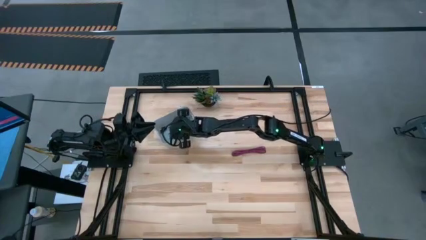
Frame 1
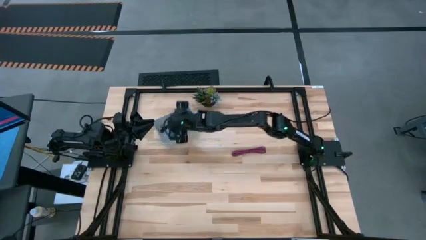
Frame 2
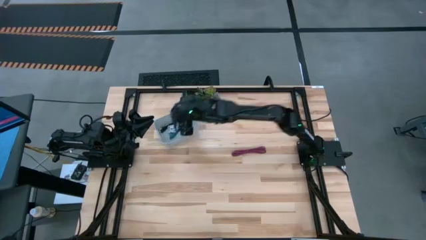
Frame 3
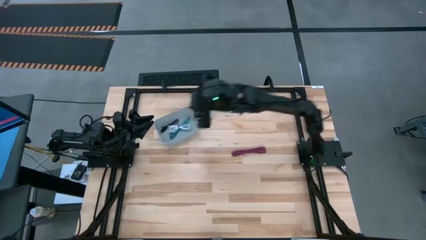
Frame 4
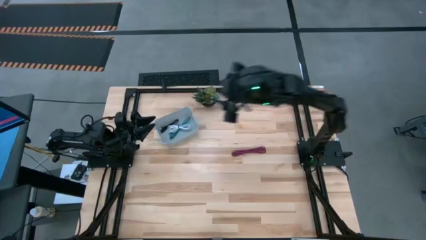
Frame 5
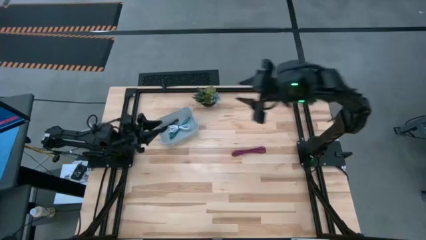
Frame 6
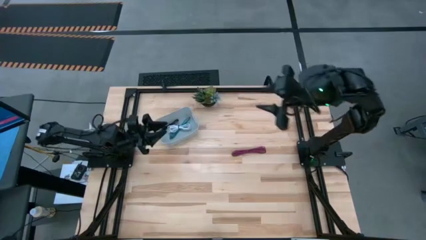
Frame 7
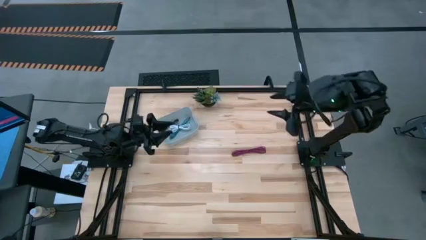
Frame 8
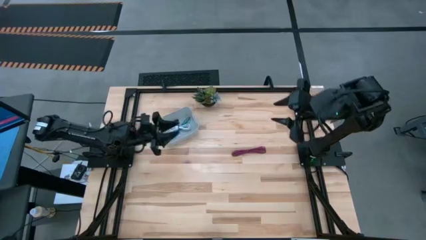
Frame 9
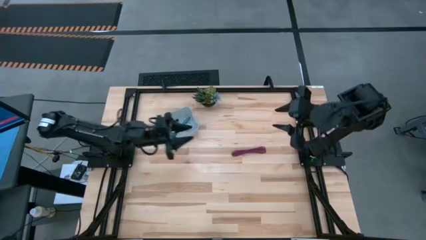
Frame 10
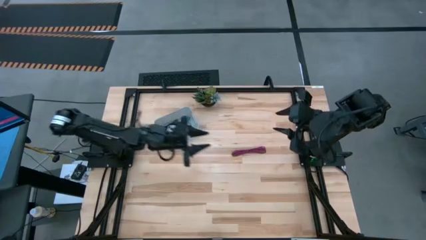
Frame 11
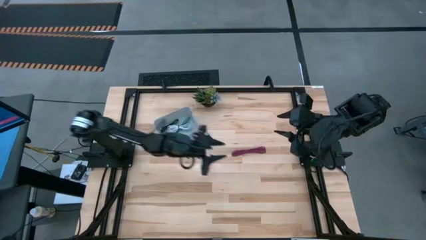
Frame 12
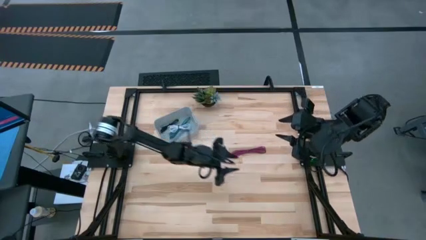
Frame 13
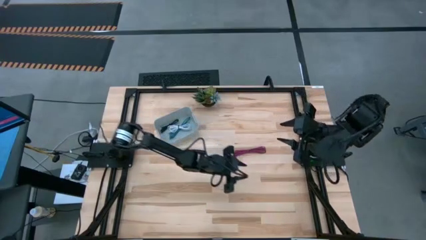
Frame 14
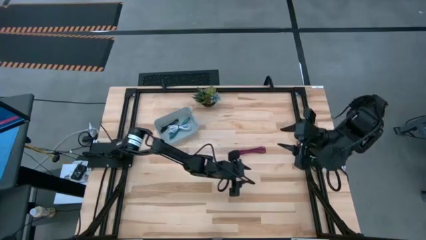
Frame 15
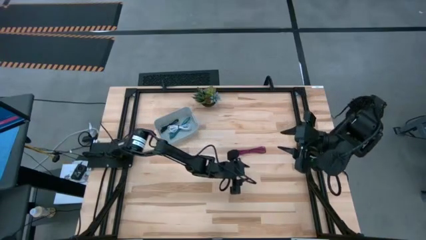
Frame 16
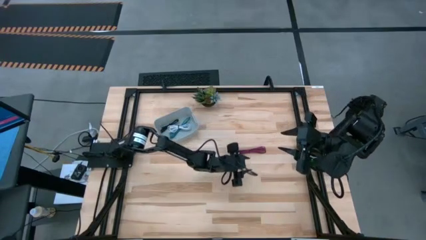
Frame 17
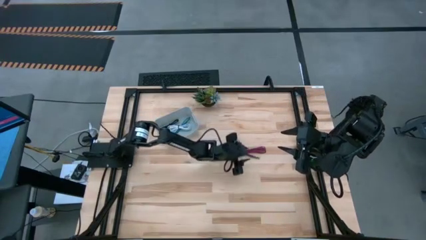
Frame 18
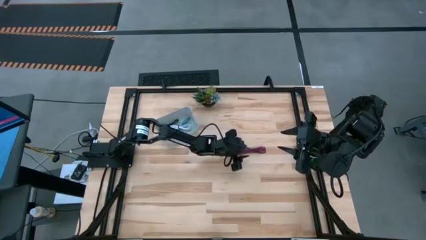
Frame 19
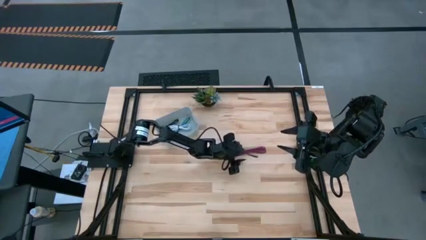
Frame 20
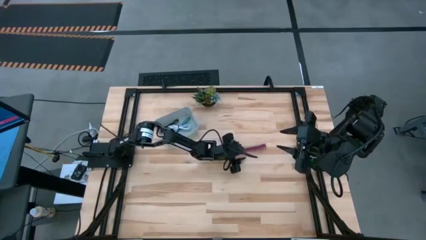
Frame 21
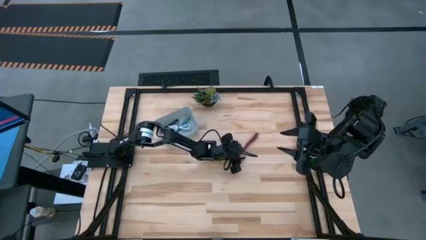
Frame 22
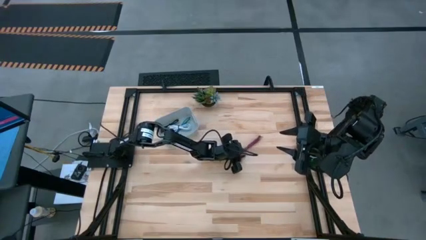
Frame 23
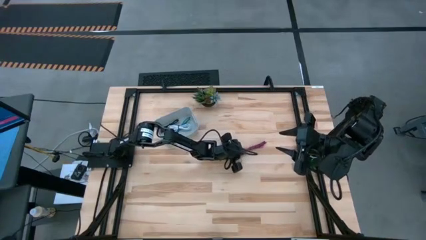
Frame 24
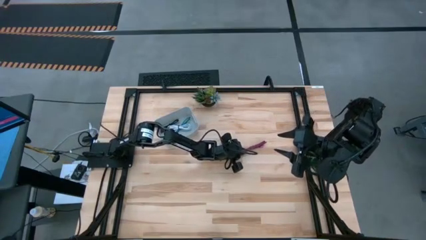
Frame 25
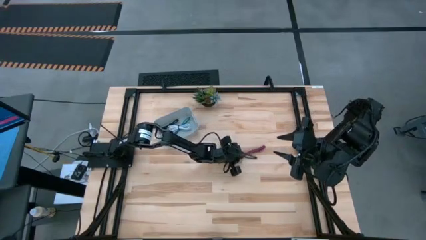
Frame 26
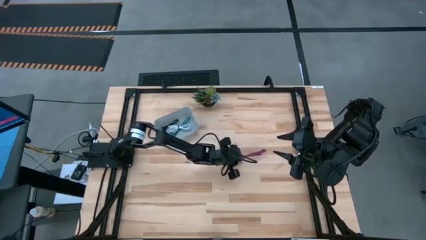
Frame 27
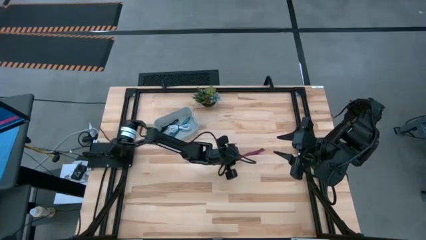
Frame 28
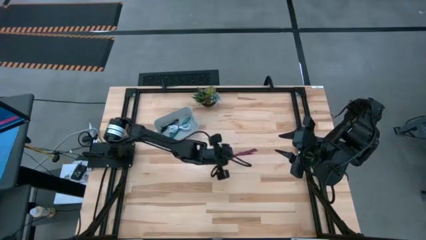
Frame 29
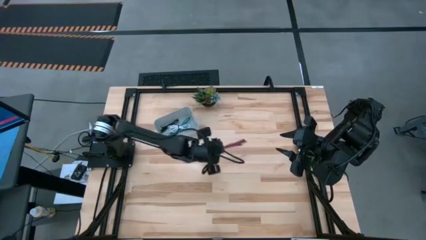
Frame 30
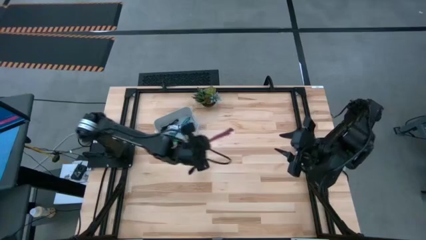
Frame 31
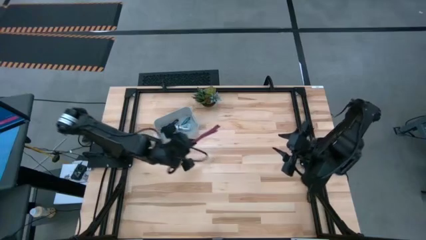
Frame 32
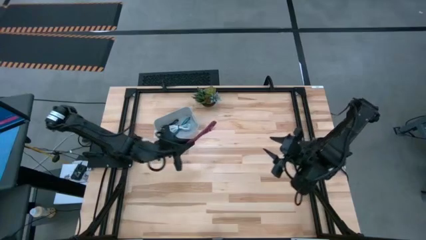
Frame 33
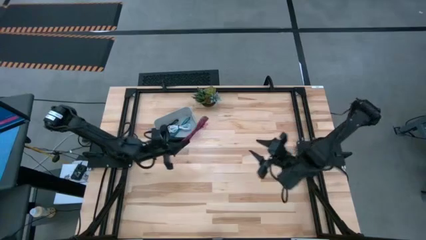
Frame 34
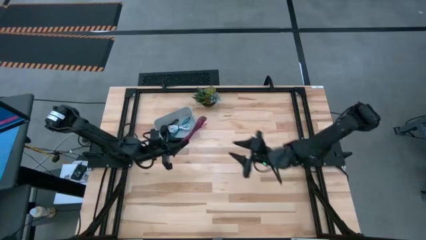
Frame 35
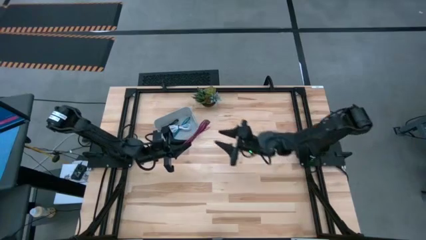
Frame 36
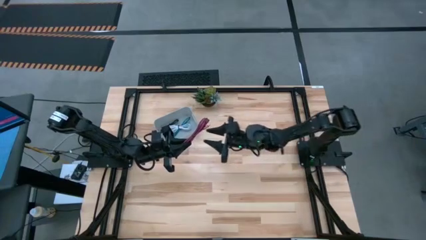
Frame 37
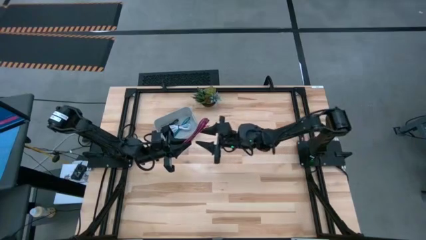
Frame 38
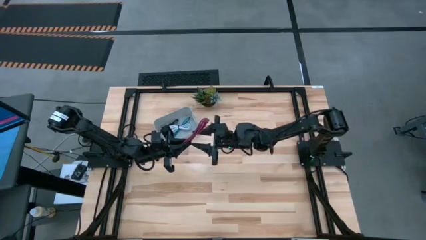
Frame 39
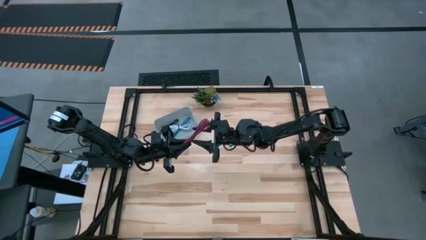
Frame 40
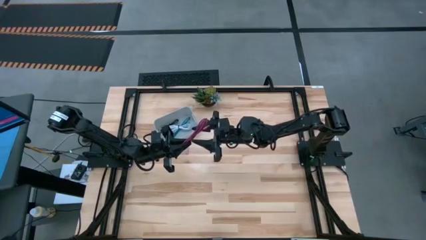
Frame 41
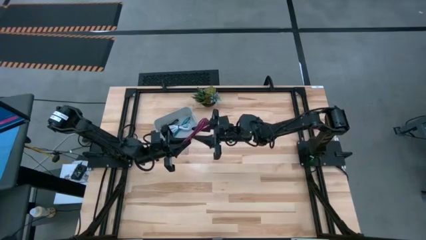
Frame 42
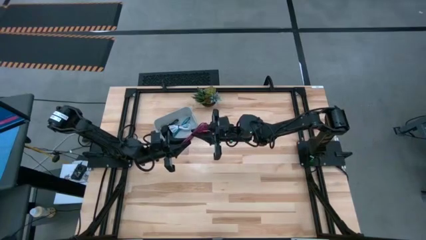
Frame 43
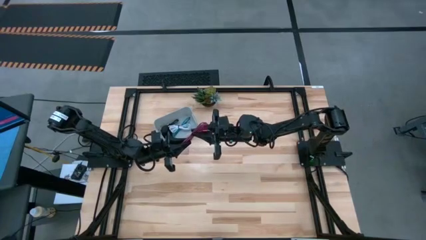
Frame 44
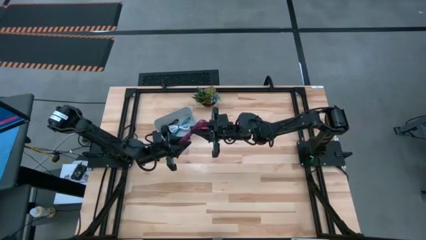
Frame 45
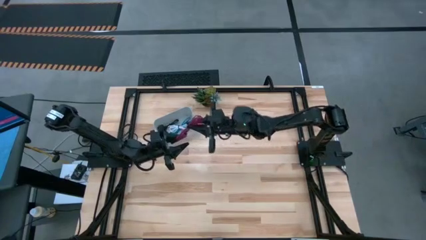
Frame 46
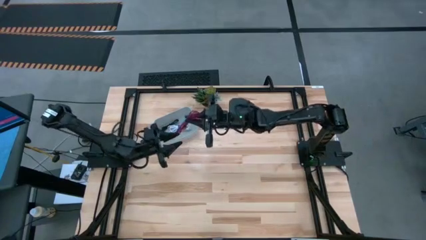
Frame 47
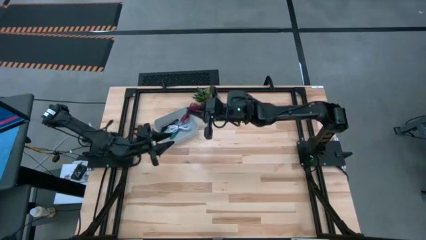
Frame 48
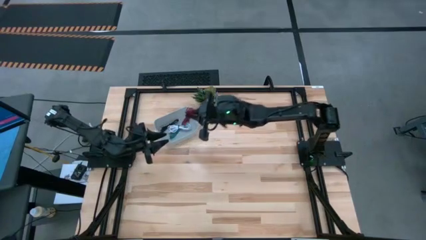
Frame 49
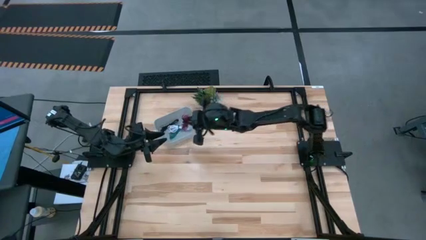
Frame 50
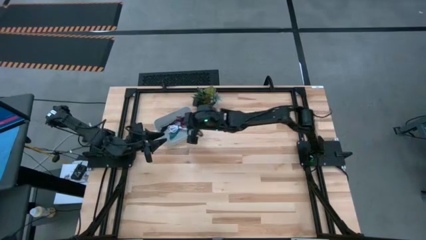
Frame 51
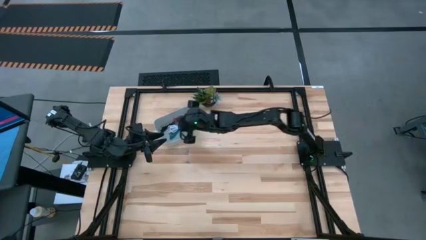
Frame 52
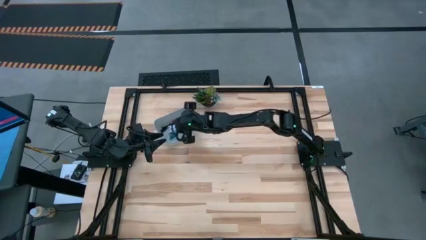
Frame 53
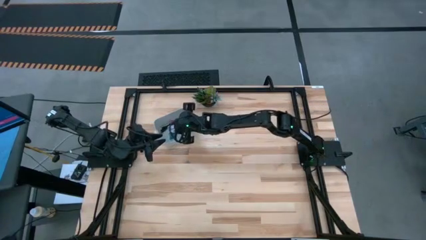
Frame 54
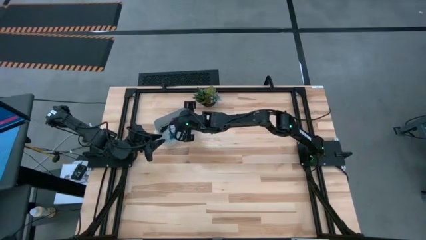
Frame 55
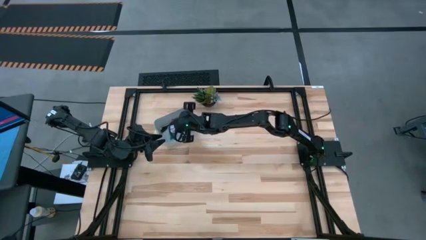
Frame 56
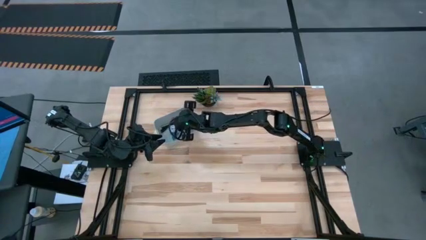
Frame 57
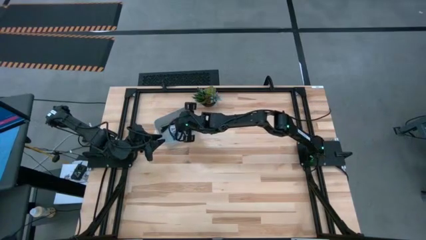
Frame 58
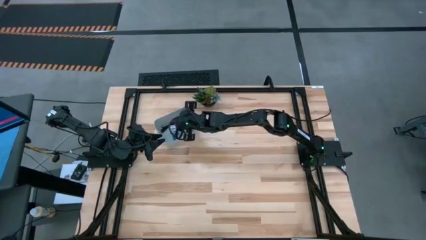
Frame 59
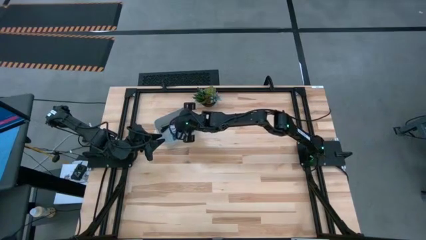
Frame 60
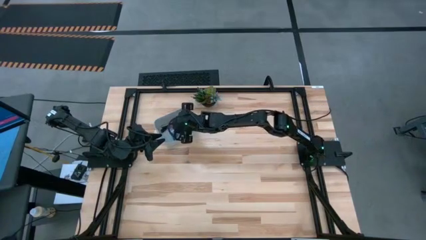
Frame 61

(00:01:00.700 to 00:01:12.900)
Task: Pick and place USB-C Cables
Put the red charger cable into the white bin

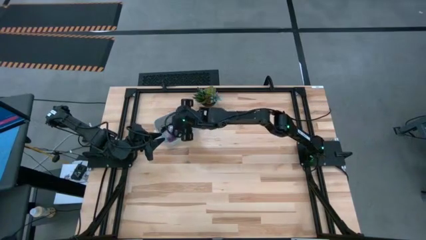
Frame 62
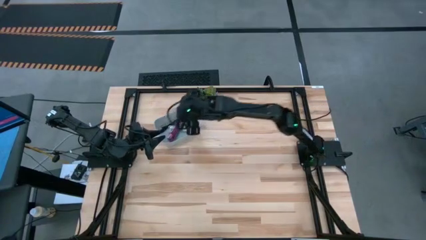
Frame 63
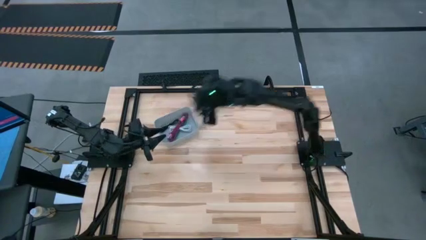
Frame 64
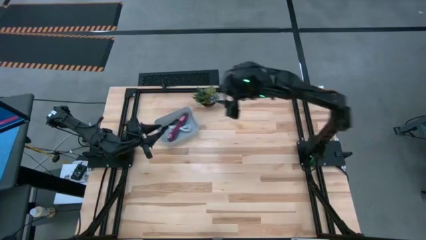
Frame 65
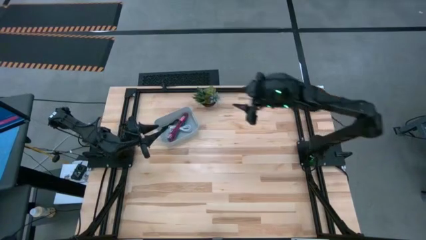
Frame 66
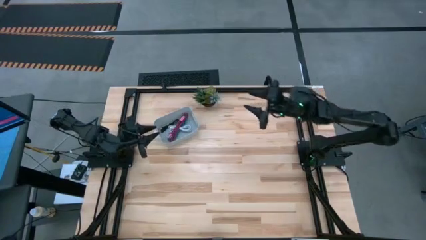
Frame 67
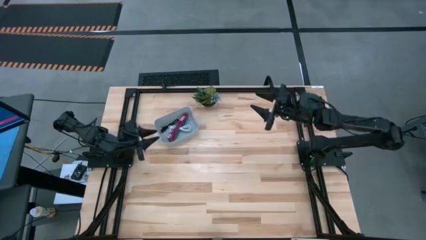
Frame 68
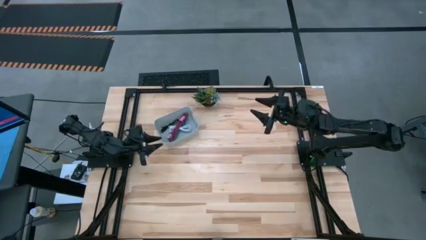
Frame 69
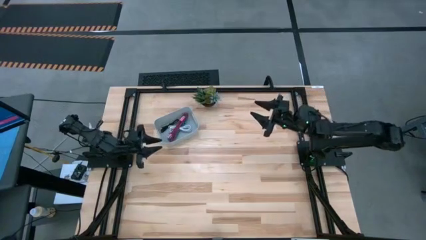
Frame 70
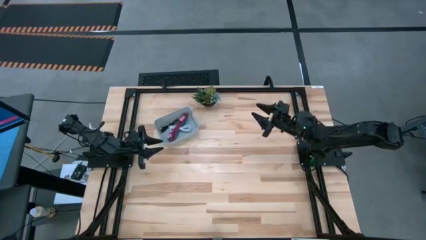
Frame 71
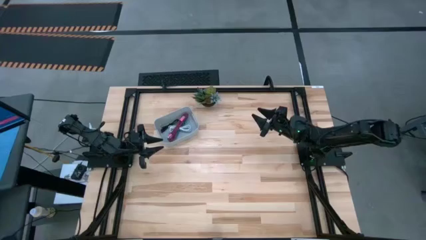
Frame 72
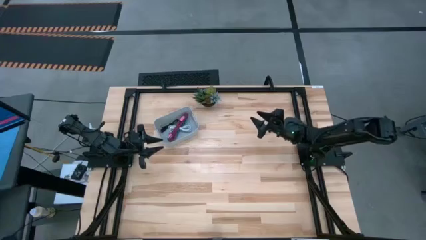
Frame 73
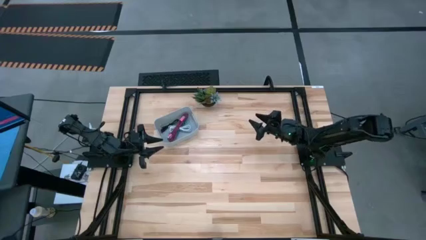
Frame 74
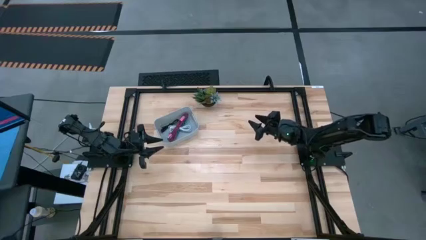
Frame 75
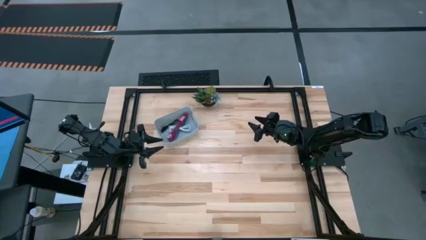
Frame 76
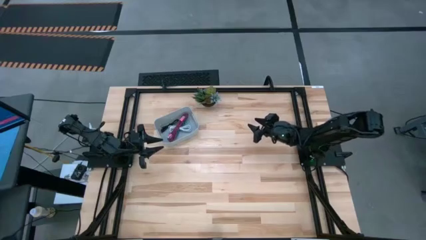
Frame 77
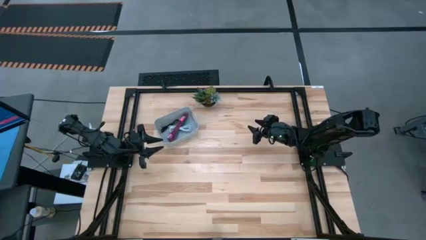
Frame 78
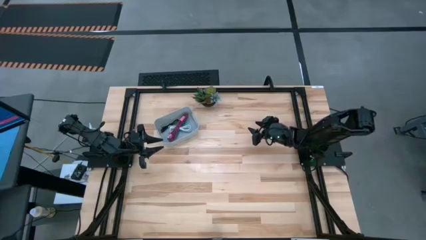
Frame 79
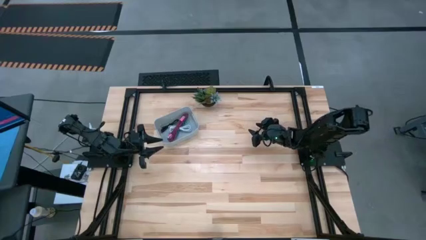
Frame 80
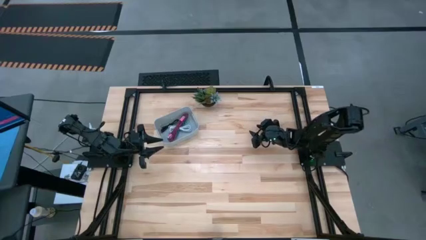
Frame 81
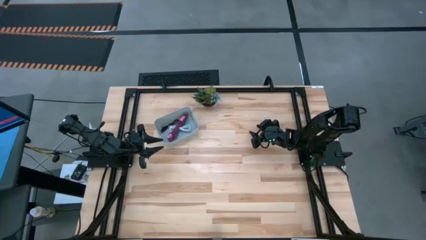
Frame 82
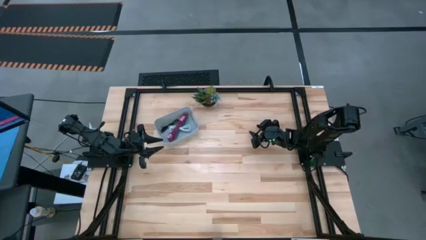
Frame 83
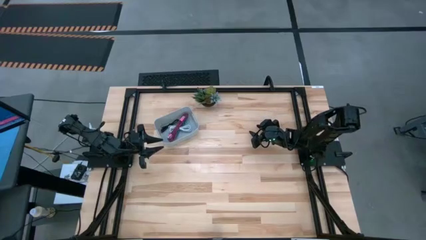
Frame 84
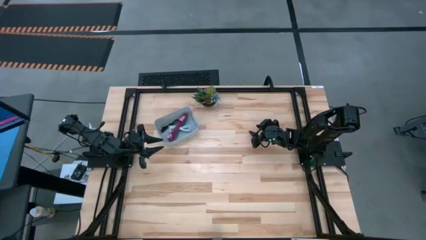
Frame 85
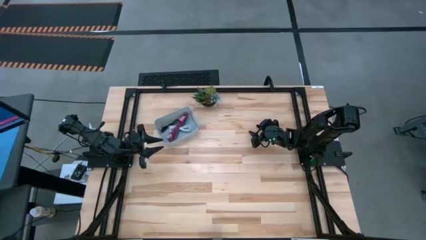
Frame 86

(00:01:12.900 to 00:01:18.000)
Return to Home Position
